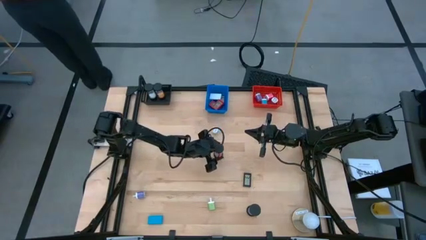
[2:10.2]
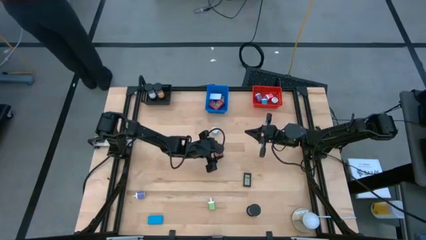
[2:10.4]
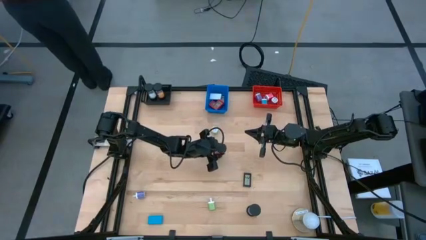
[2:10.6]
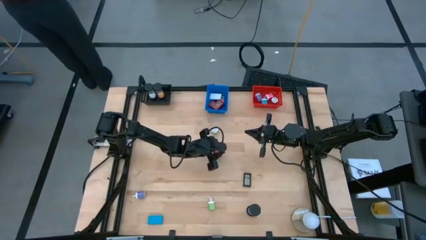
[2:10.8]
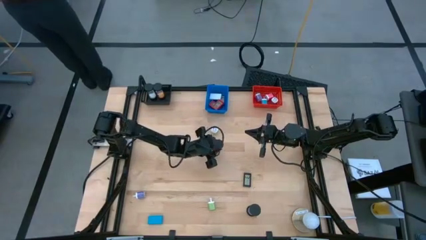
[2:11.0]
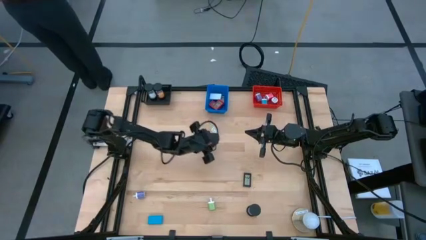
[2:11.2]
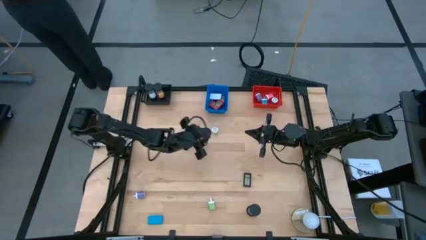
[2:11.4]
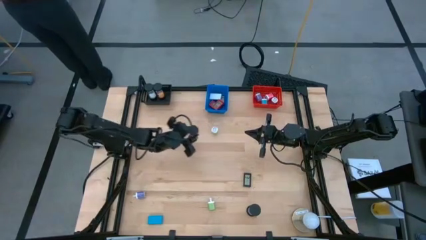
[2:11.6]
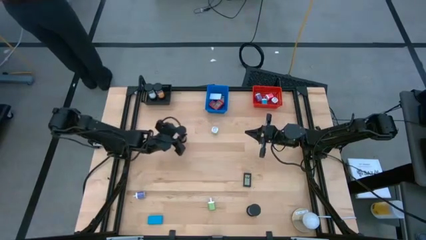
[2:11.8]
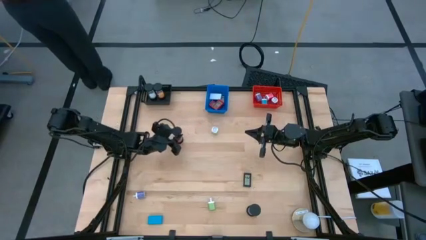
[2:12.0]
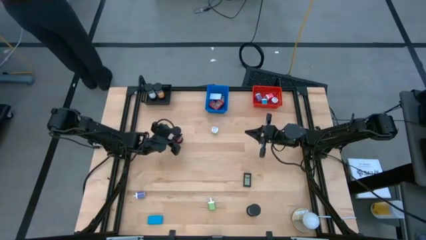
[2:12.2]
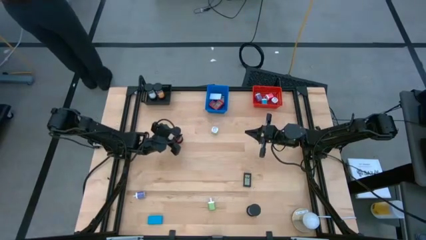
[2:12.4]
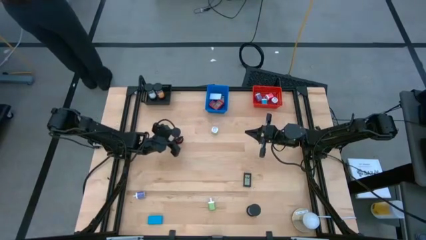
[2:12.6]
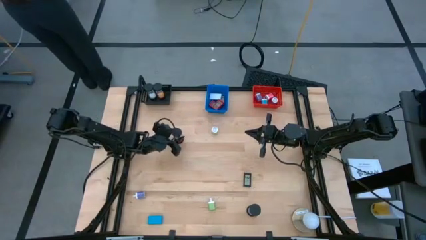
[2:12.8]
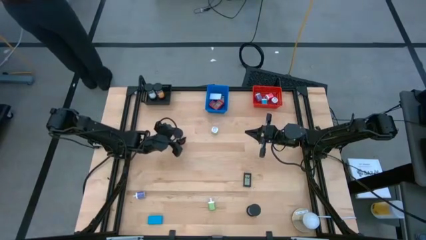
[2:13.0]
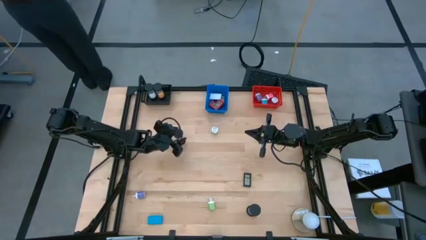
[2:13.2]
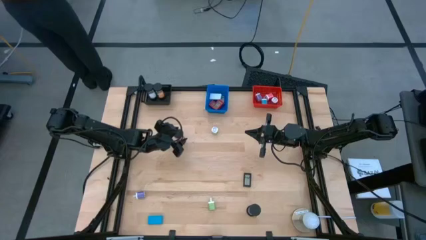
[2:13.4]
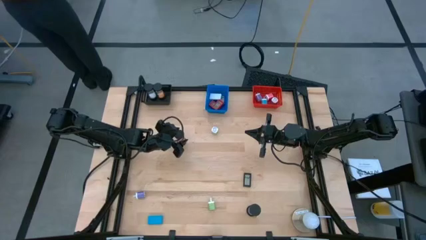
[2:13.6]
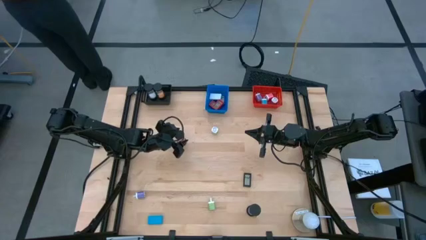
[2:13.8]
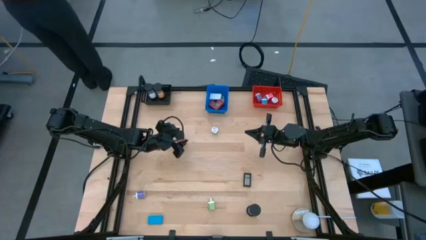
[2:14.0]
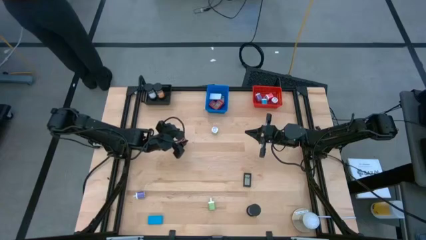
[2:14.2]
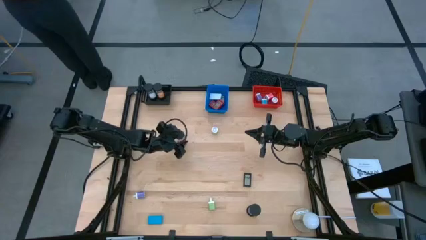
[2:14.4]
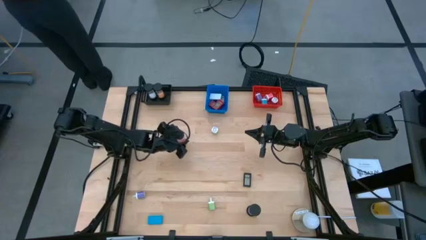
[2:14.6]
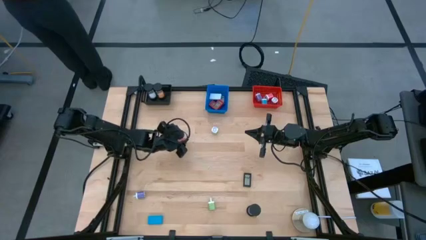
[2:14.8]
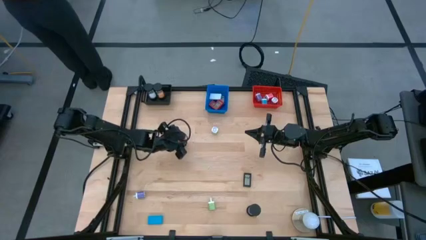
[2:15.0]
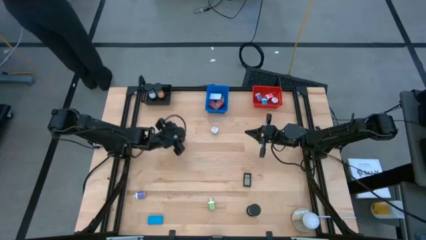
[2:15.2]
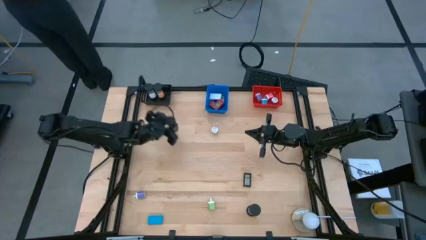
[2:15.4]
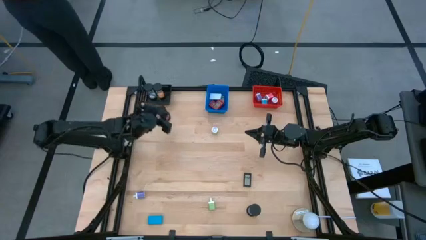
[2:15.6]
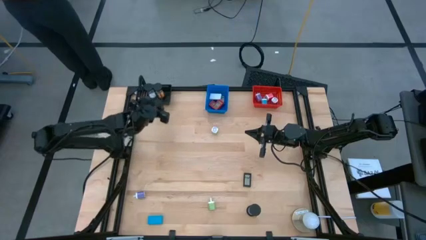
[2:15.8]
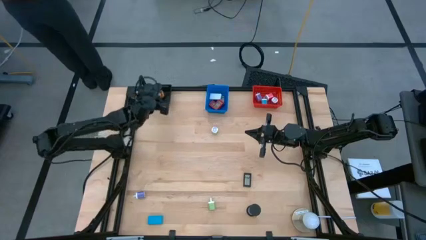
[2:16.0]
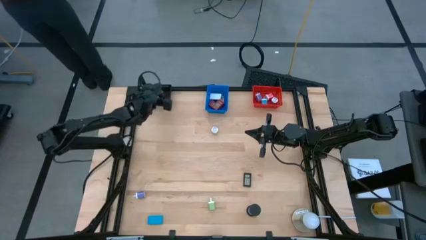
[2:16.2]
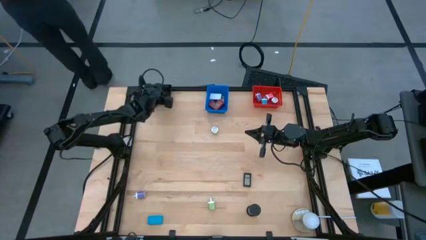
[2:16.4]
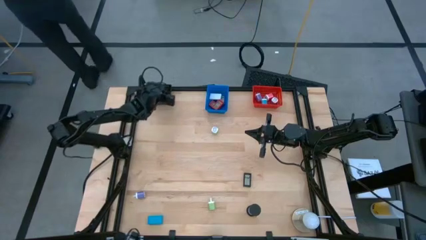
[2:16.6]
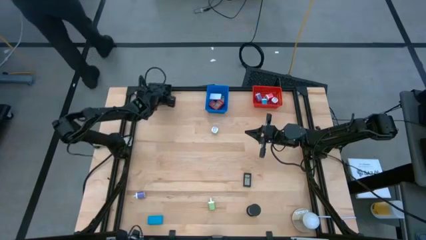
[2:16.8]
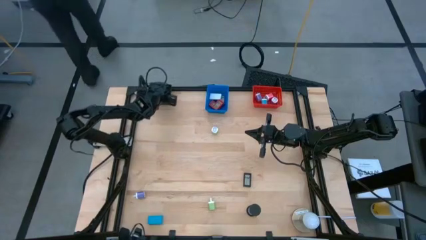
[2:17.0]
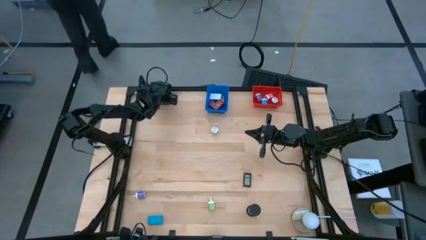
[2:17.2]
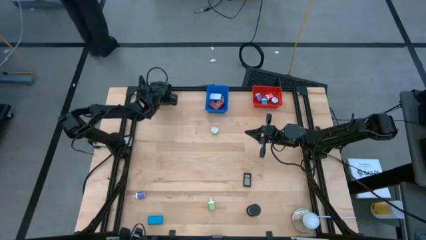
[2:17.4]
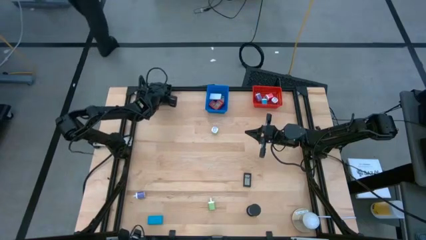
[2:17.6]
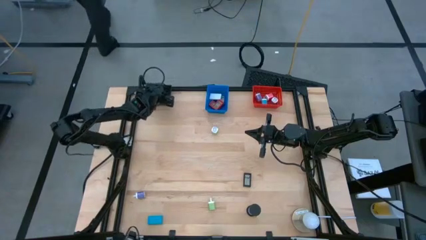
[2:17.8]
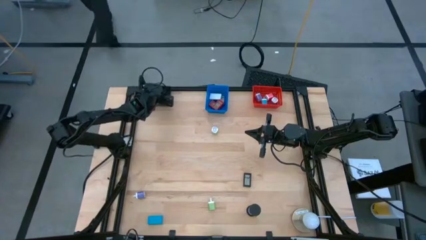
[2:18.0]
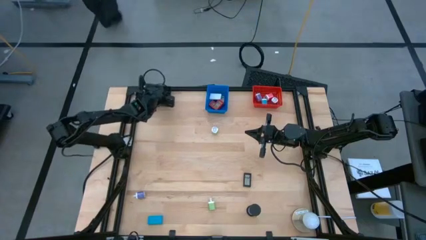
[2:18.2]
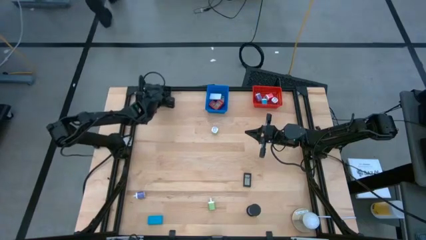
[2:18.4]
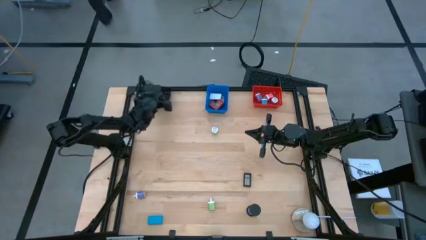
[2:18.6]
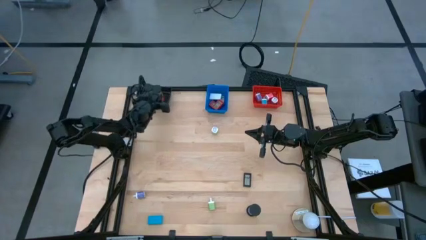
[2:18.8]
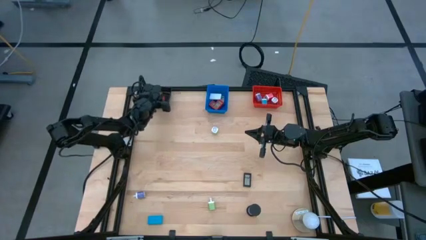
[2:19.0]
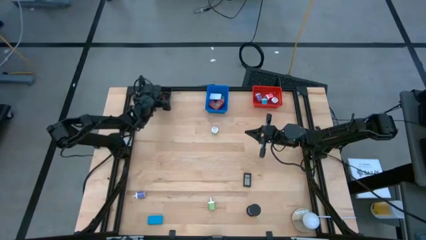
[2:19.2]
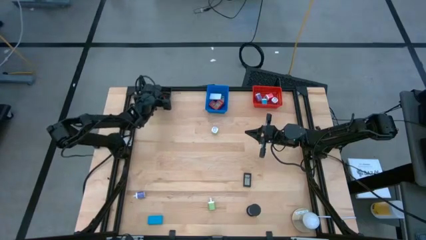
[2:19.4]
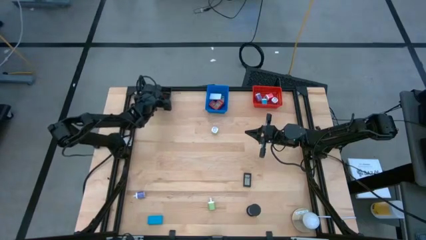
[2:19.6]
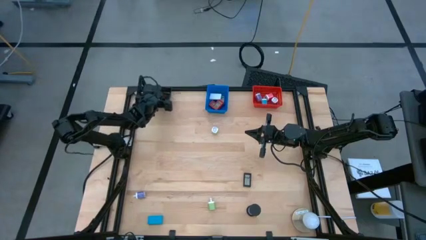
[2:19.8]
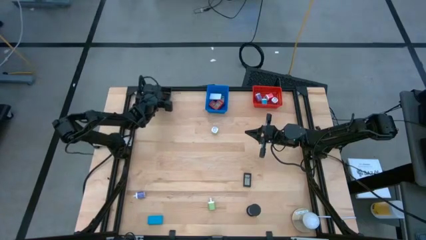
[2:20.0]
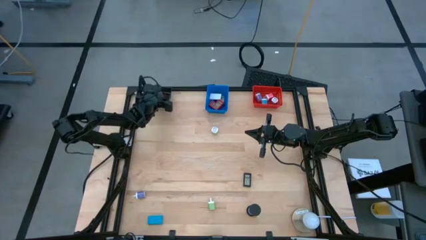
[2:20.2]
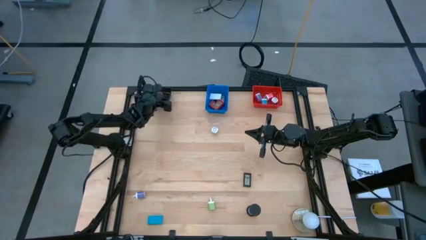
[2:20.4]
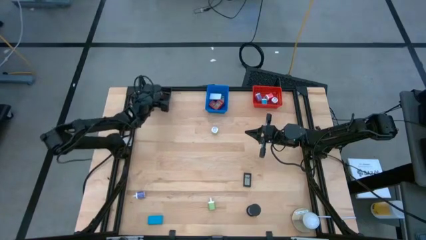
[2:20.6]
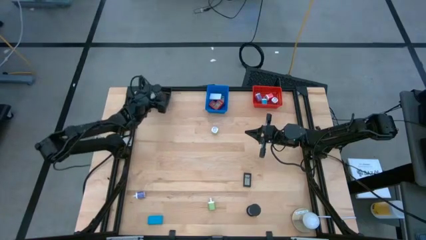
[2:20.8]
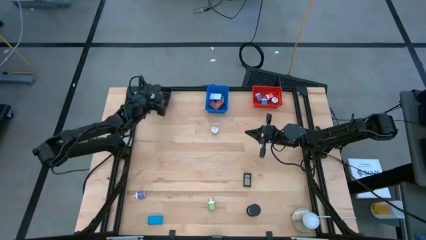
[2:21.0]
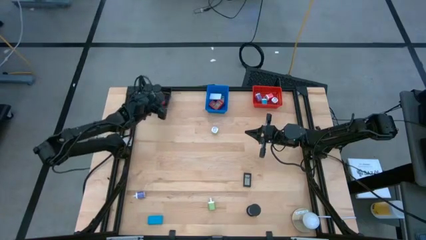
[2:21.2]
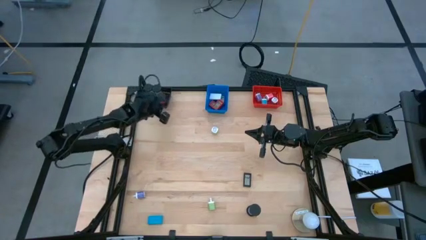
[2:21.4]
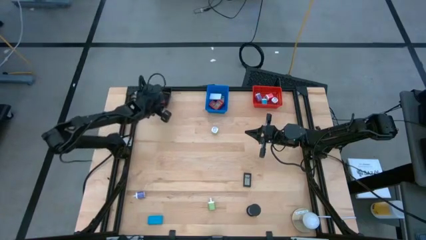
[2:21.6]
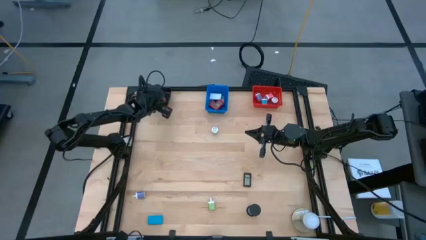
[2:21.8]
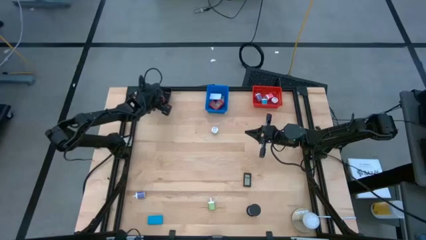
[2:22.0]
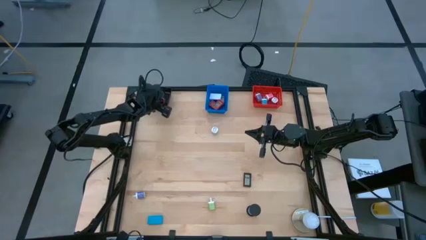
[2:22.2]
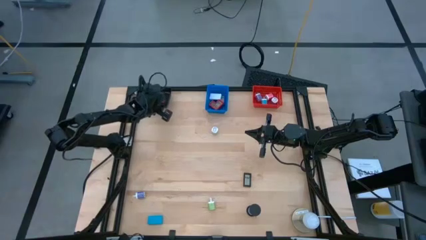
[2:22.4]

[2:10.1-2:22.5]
Task: Pick & Place Office items
Put the pink hourglass into the black basket

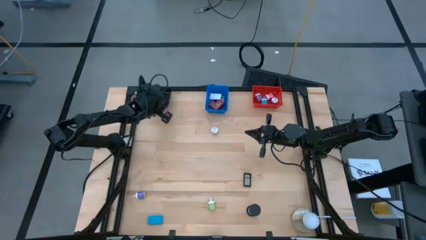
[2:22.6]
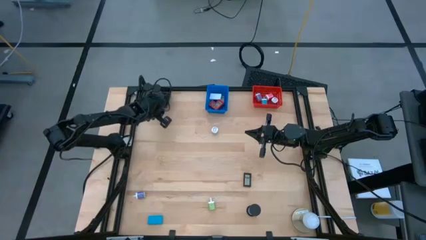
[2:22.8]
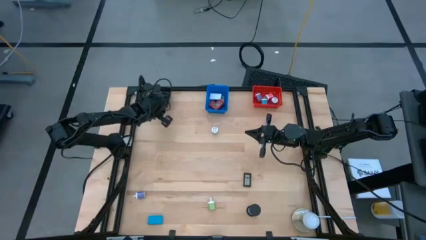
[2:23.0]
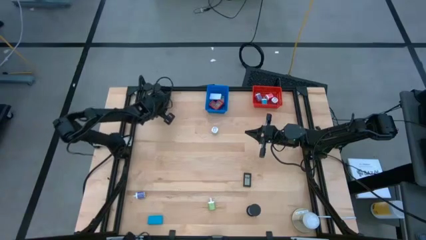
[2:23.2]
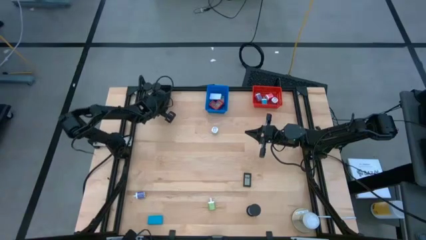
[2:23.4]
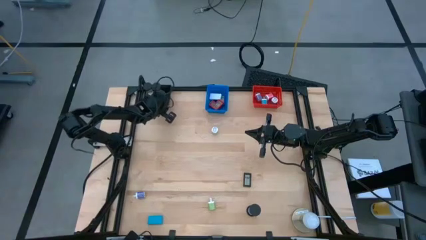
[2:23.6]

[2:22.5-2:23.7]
Adjust the black basket

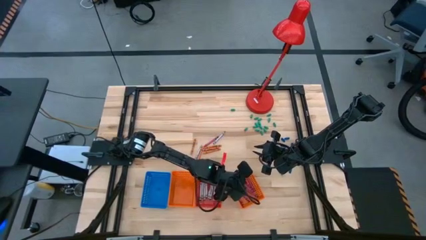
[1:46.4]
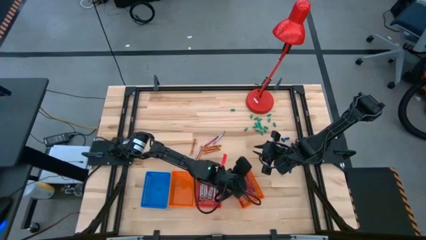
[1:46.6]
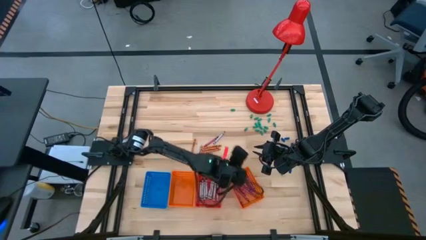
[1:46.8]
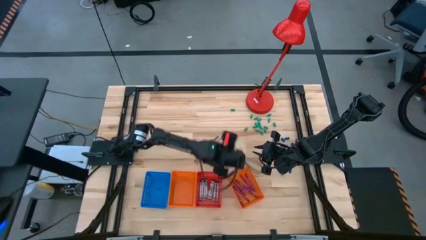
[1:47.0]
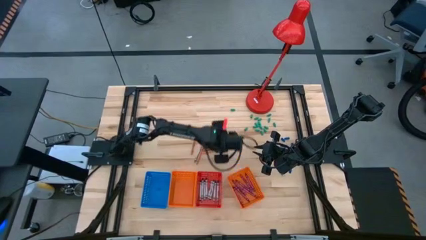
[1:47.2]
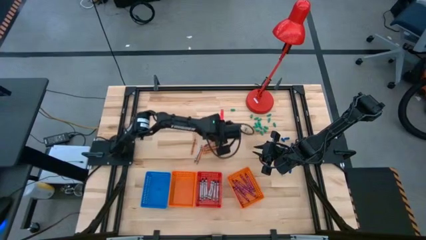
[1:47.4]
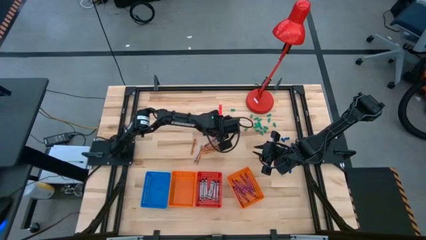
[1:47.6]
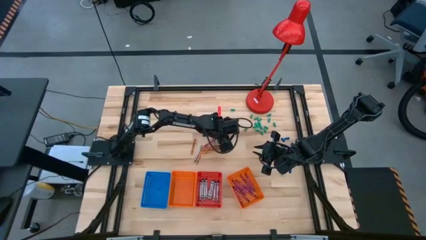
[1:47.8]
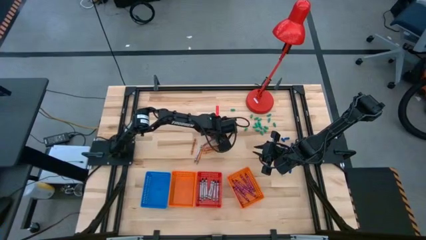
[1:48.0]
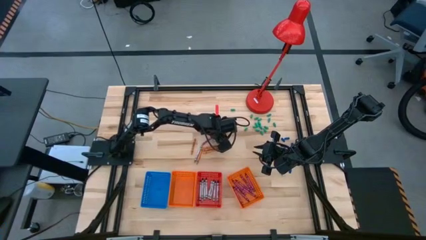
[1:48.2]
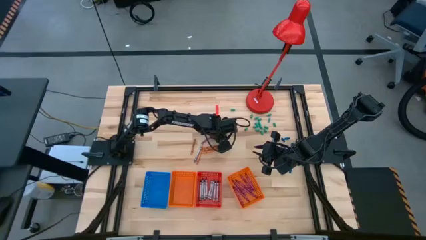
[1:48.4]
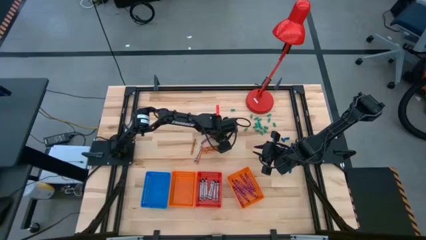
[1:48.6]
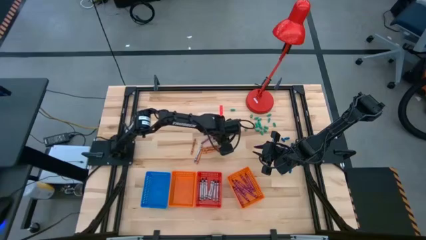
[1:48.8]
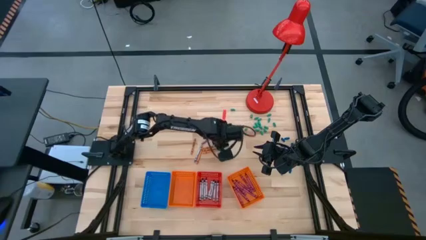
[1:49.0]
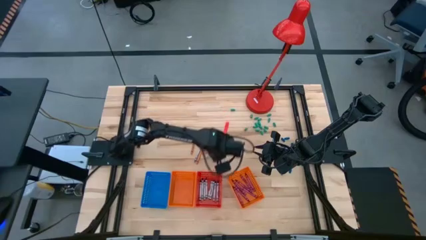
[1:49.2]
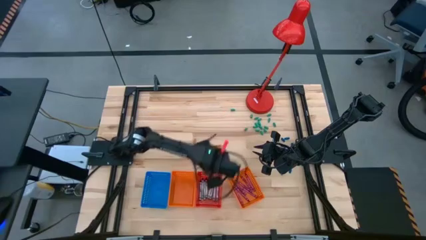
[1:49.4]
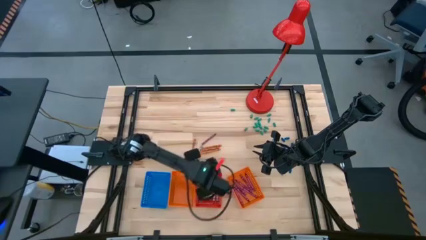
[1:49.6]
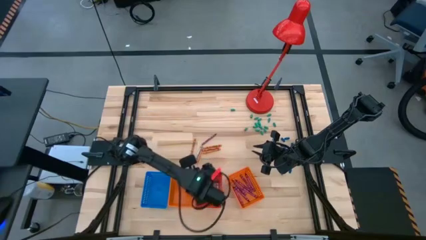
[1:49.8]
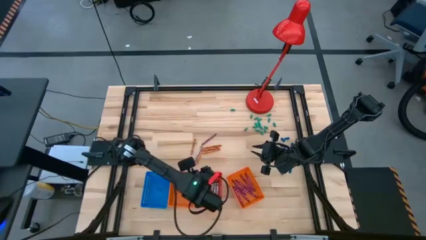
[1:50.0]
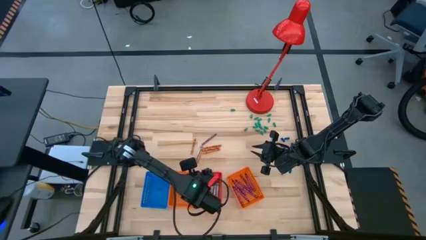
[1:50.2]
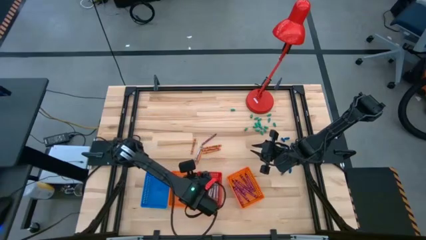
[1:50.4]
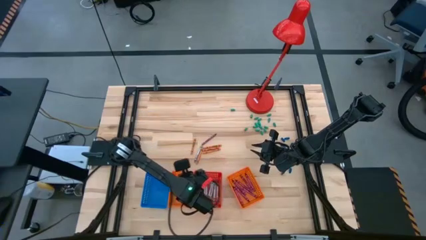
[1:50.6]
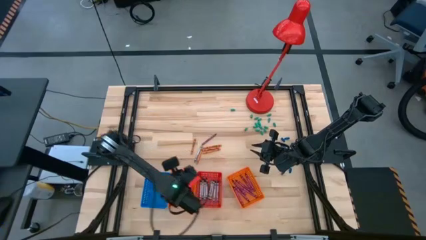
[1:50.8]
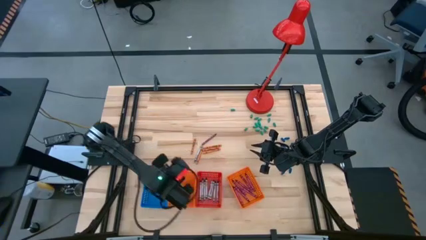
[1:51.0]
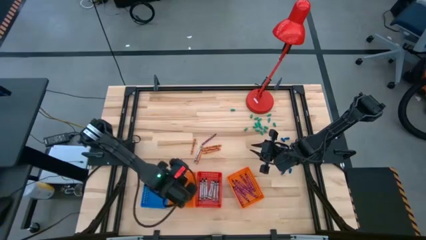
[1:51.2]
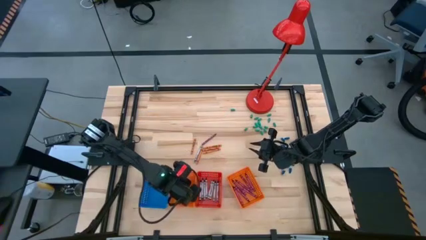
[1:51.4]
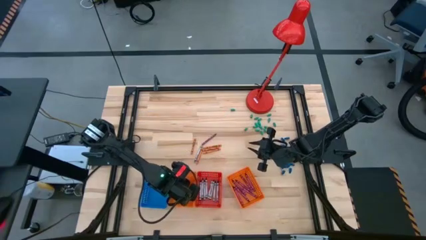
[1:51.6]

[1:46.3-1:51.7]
Task: Sort crayons
Put the gray crayon into the left orange bin
